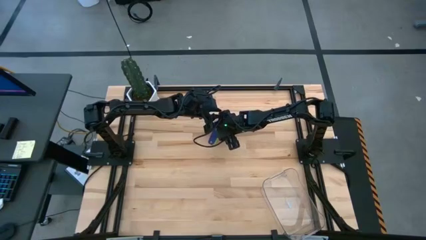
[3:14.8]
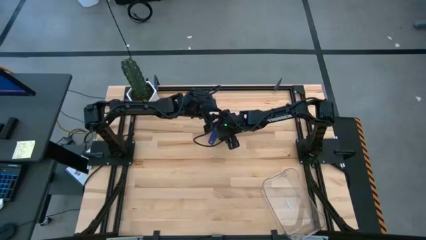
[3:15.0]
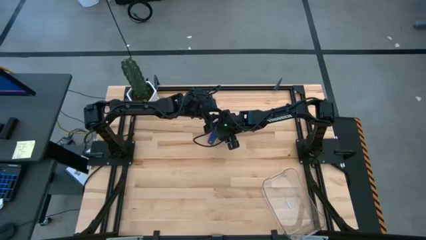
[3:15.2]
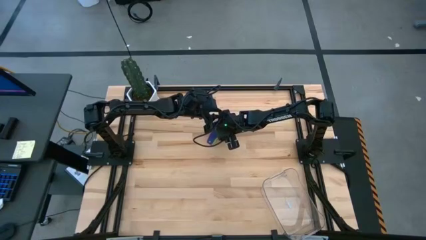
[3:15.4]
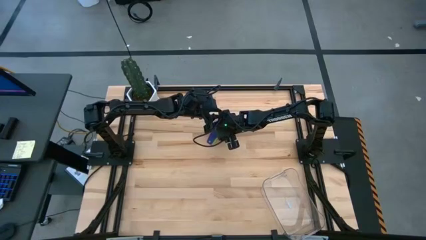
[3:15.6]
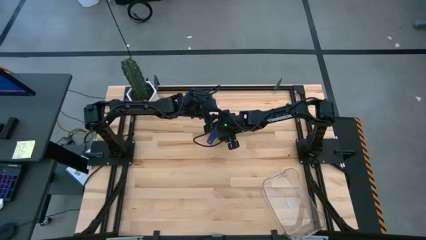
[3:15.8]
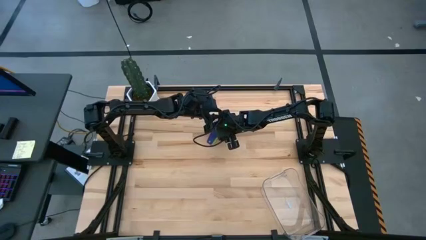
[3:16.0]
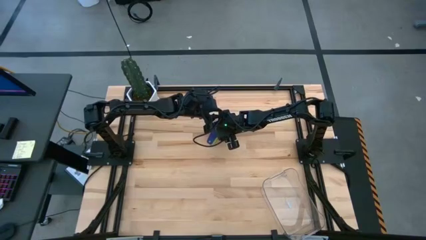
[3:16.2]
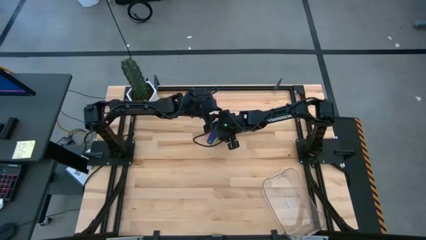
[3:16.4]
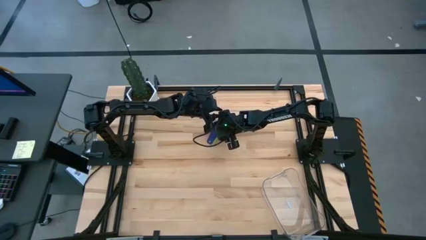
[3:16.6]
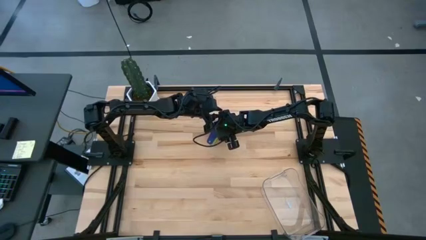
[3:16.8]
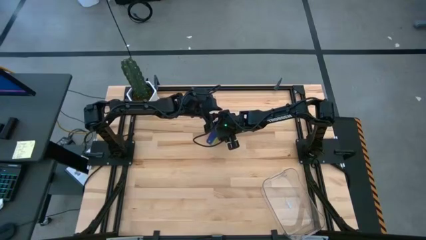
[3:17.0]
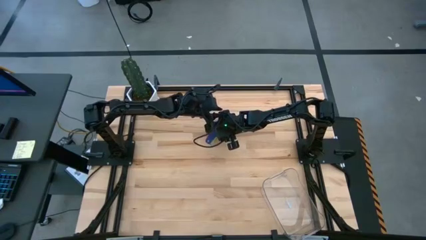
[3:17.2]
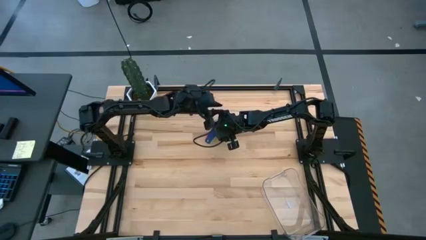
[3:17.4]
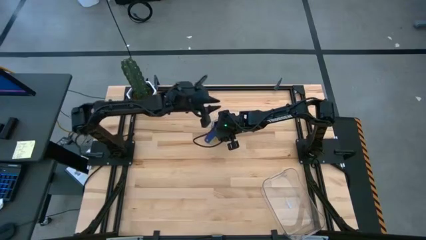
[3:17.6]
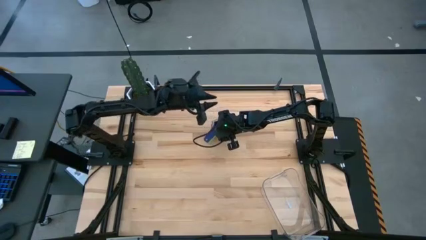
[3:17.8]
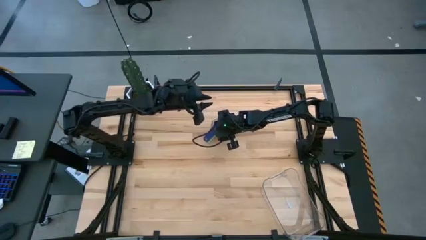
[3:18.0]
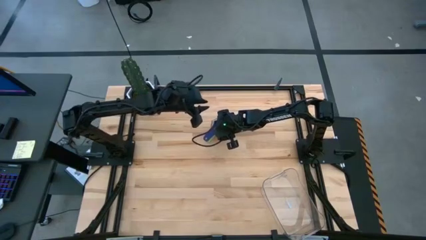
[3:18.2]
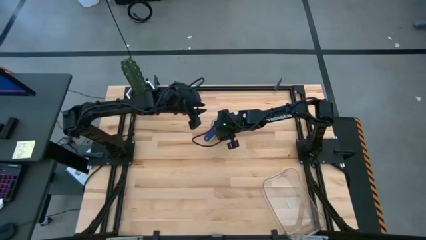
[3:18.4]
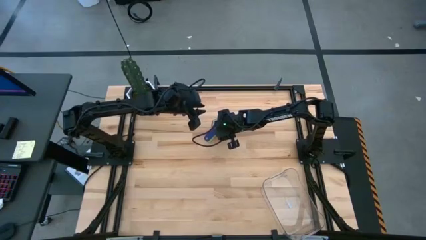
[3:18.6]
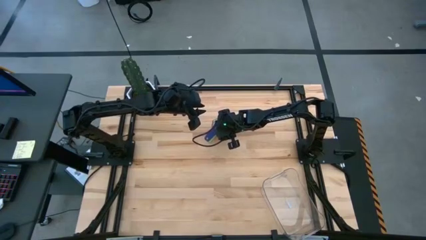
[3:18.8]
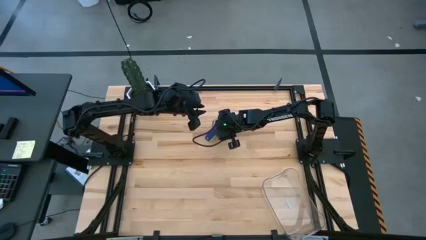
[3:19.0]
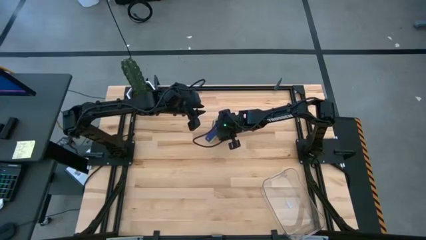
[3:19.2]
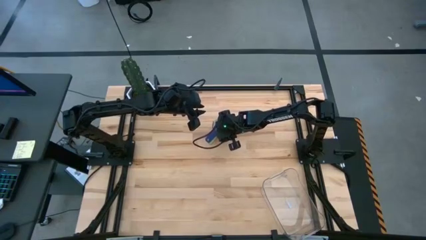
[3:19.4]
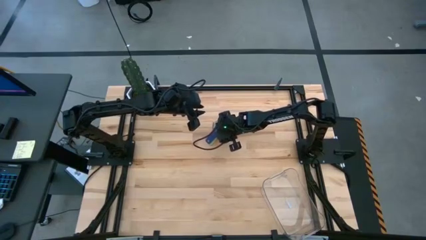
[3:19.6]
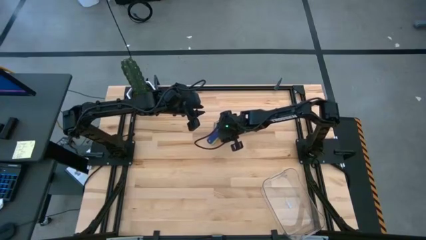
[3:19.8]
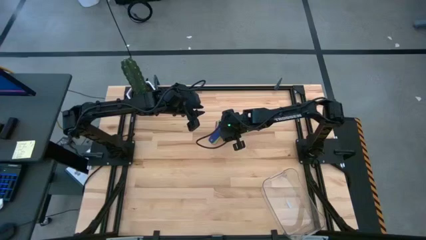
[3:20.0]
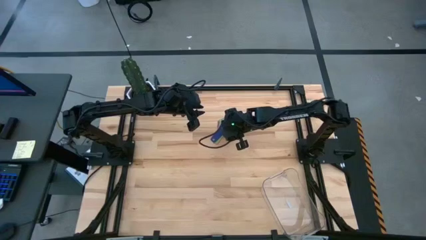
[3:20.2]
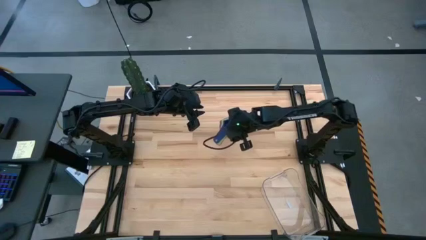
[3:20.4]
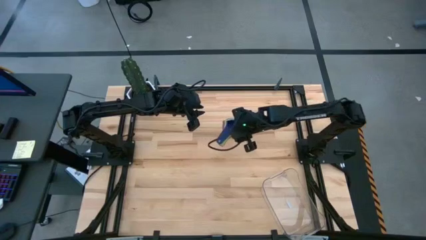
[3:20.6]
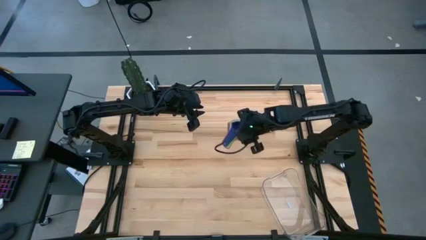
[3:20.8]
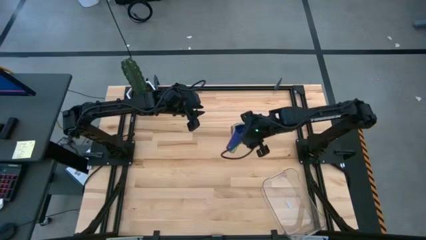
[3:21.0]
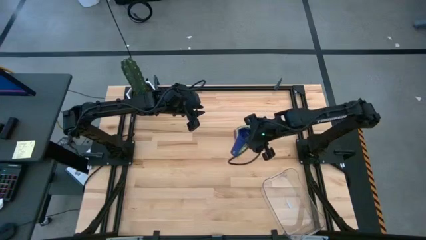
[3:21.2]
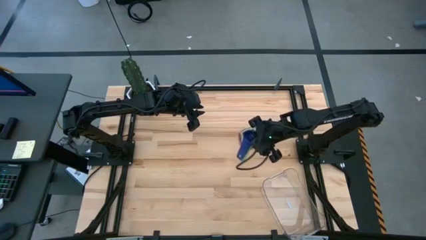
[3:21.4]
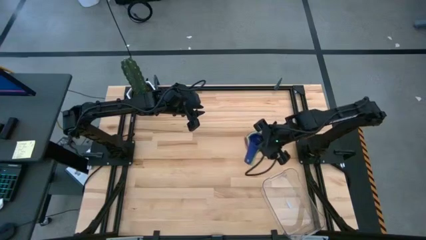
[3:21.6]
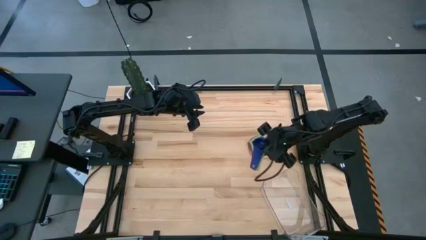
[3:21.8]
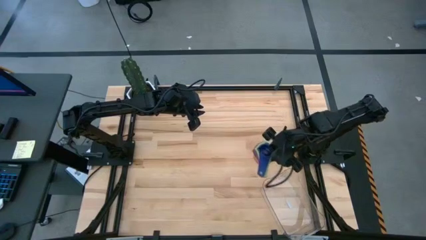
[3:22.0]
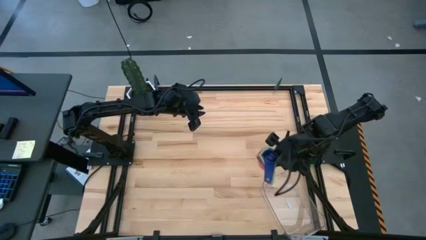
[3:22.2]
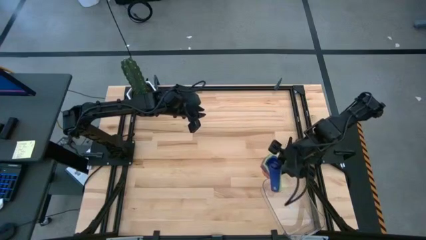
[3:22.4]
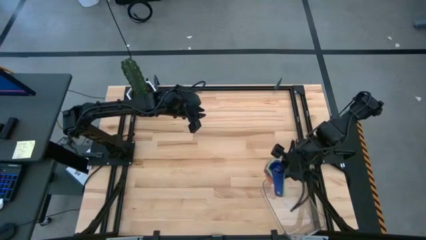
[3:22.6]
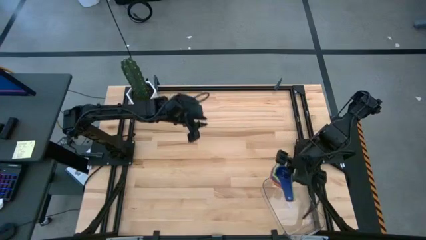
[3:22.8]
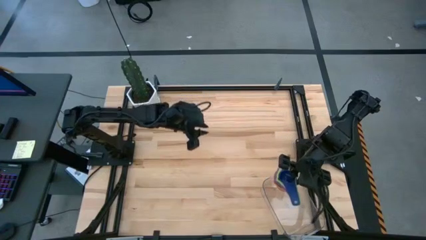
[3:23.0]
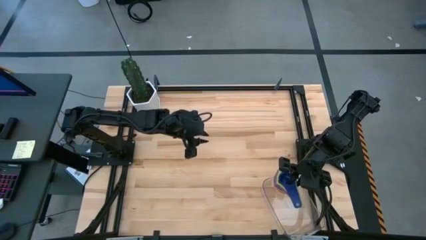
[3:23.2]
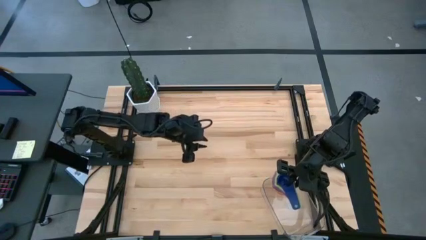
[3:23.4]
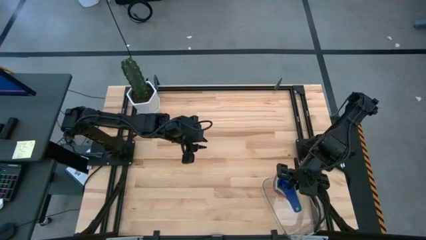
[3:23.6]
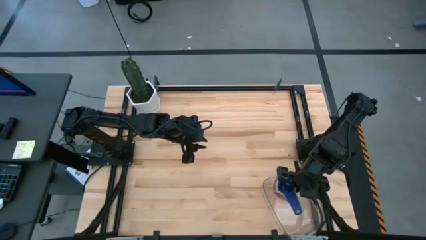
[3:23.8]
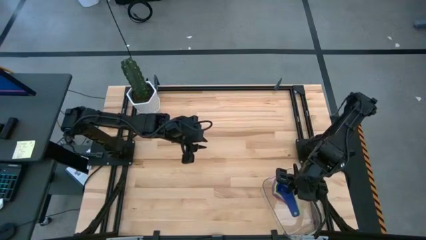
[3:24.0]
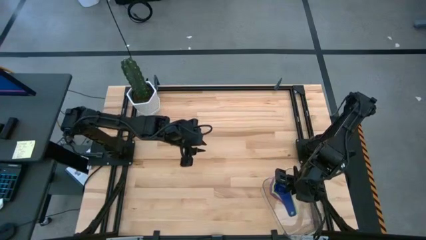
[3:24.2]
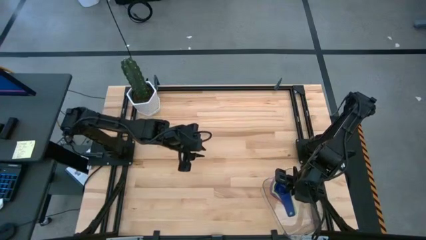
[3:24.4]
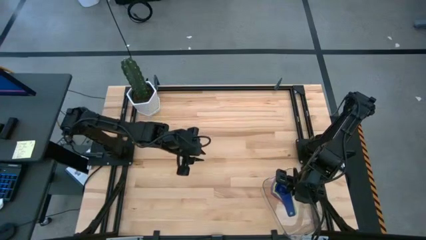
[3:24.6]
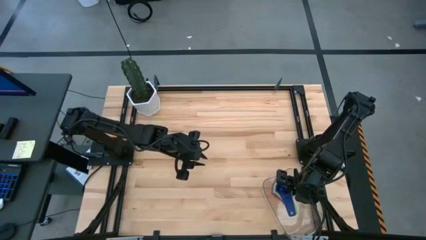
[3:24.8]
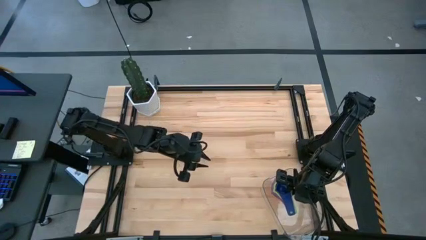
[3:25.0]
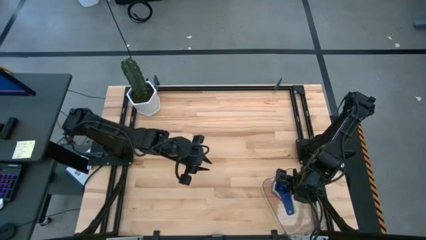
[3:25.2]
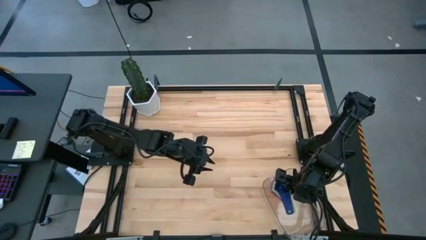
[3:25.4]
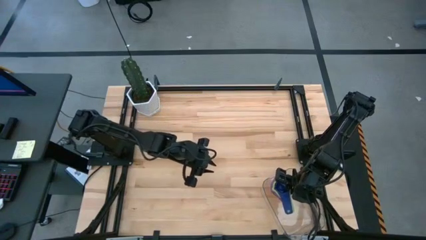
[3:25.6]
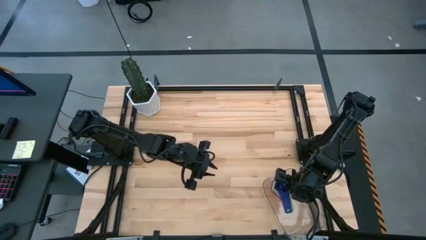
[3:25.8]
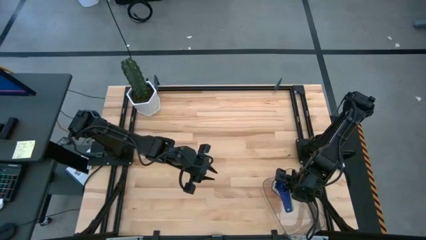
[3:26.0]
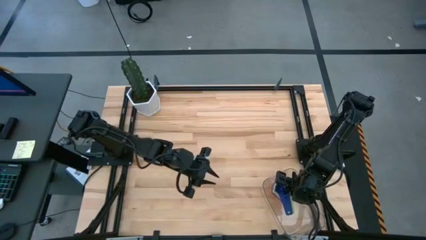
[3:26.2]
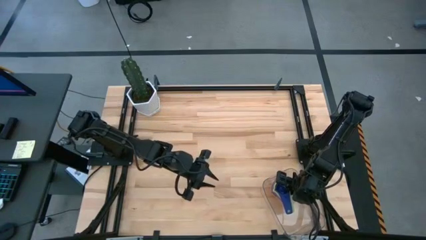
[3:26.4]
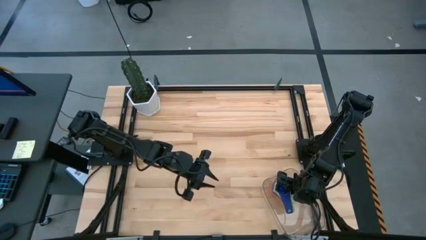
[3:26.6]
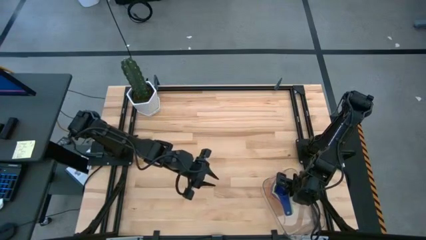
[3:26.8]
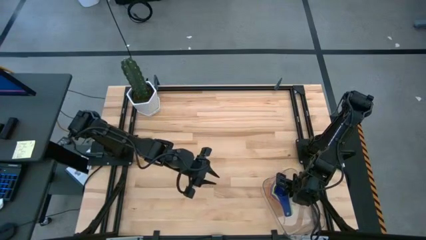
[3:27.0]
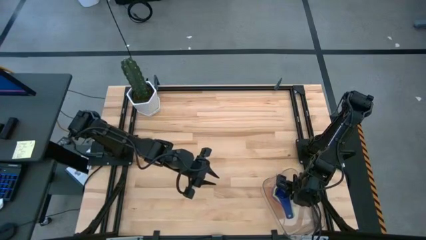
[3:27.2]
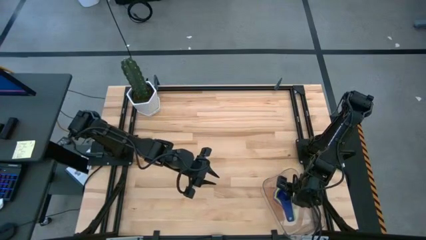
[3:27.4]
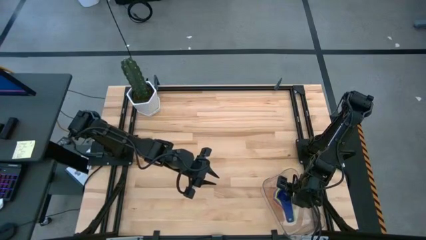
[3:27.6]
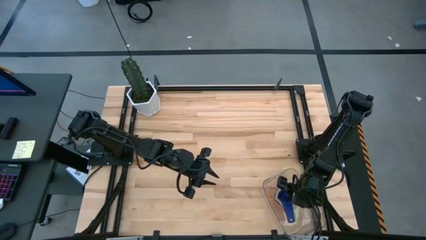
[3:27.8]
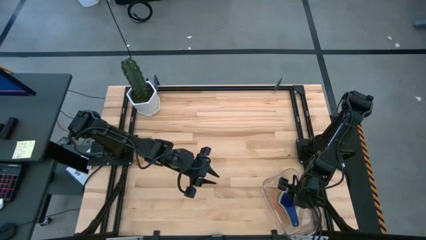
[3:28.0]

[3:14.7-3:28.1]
Task: Nest measuring cups in basket
Put the stacked measuring cups into the transparent bin
